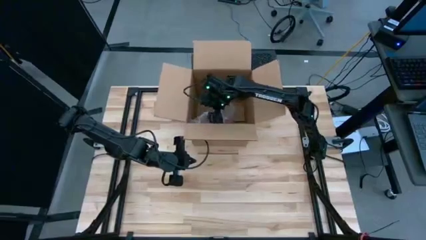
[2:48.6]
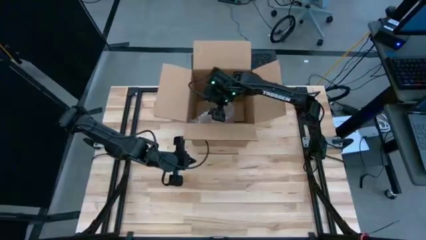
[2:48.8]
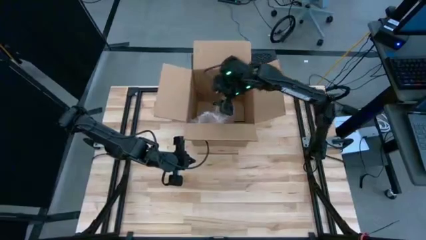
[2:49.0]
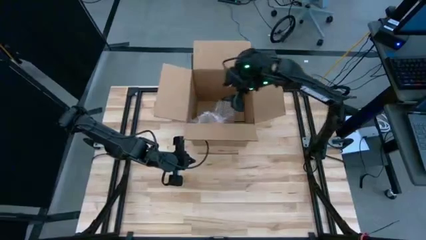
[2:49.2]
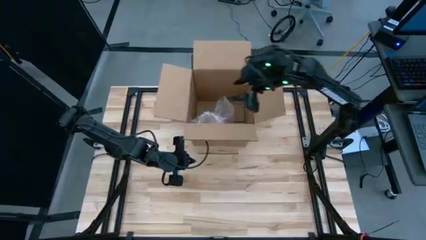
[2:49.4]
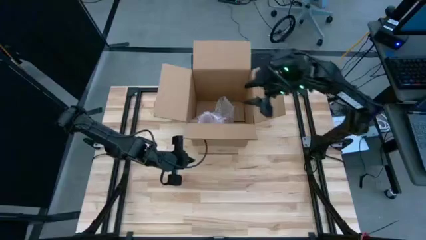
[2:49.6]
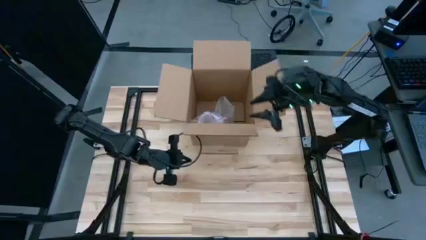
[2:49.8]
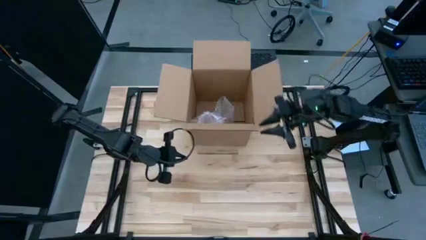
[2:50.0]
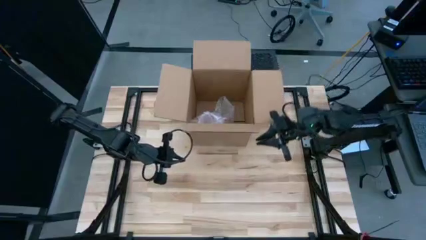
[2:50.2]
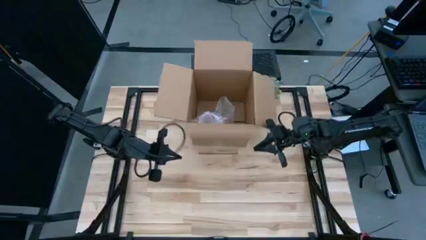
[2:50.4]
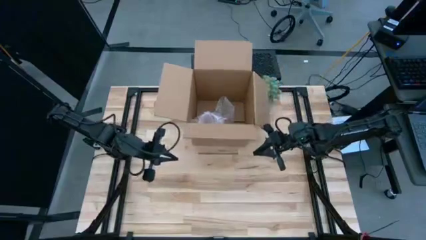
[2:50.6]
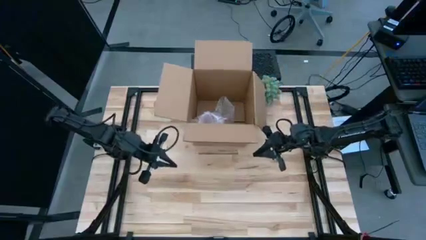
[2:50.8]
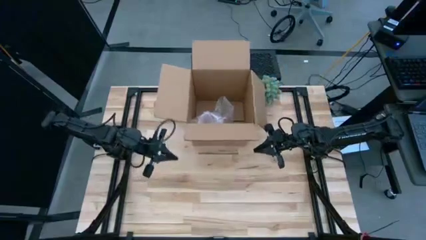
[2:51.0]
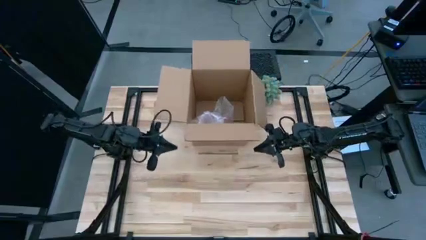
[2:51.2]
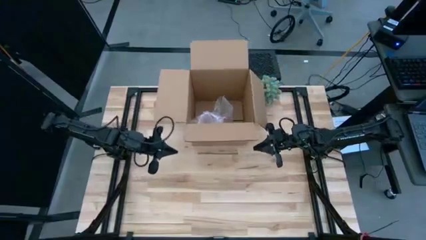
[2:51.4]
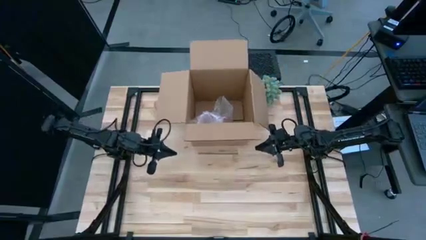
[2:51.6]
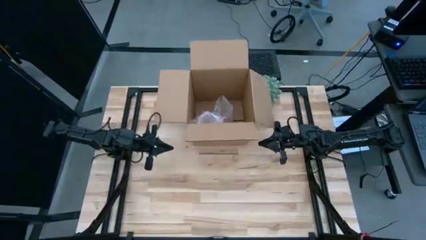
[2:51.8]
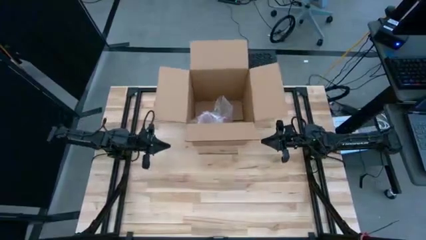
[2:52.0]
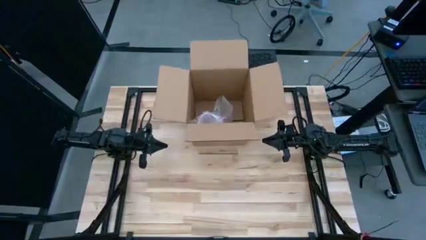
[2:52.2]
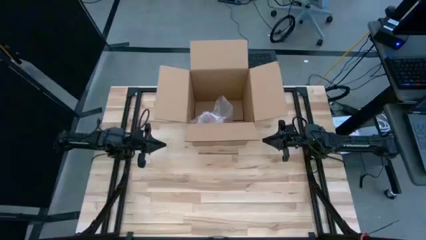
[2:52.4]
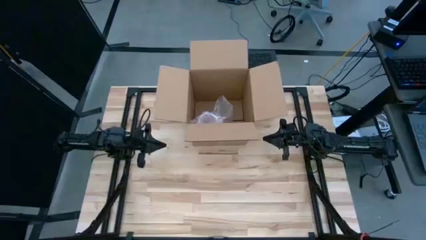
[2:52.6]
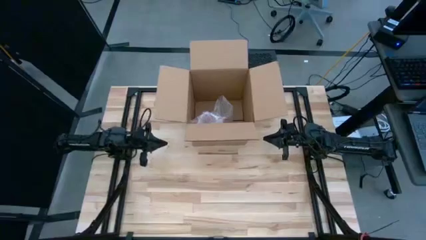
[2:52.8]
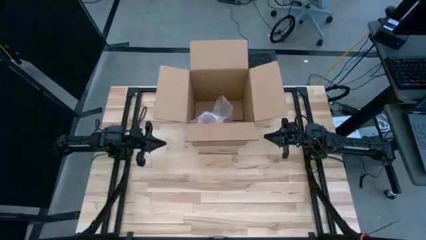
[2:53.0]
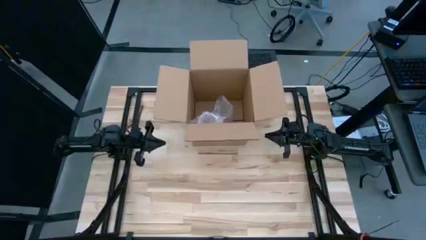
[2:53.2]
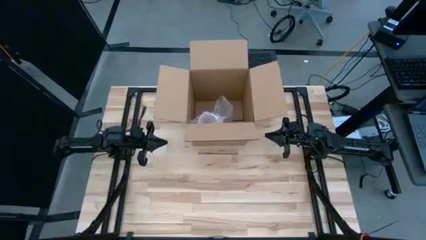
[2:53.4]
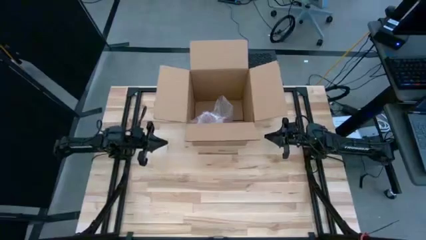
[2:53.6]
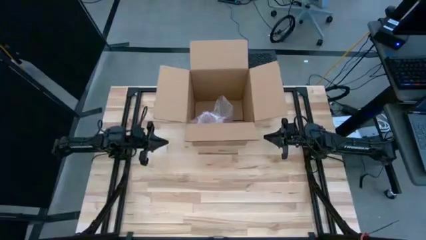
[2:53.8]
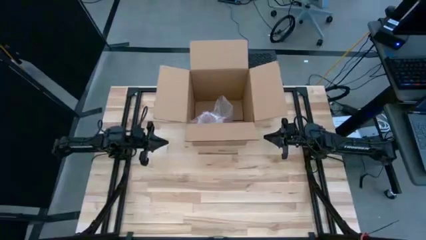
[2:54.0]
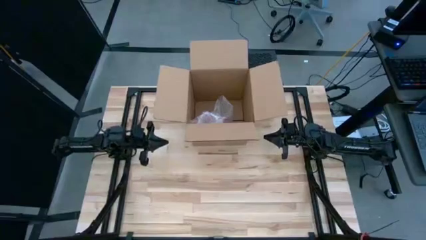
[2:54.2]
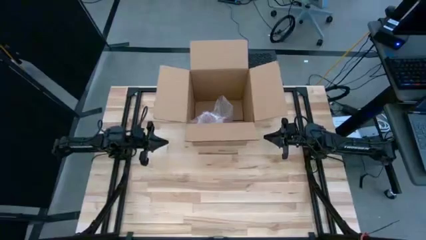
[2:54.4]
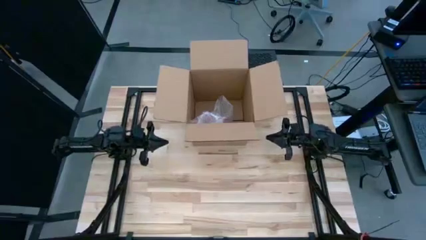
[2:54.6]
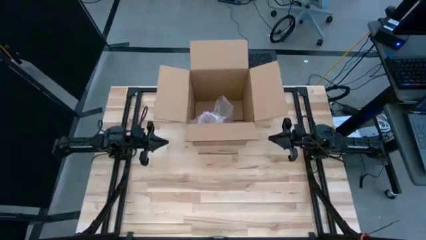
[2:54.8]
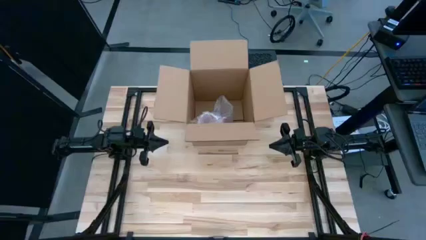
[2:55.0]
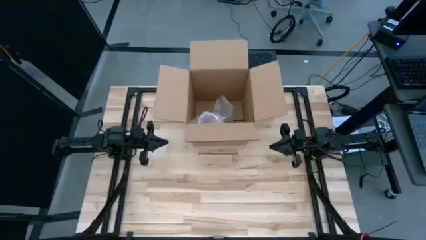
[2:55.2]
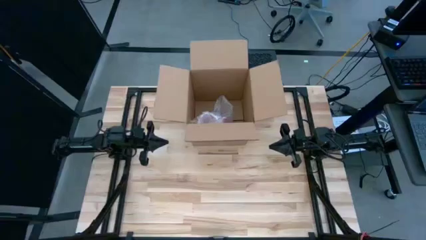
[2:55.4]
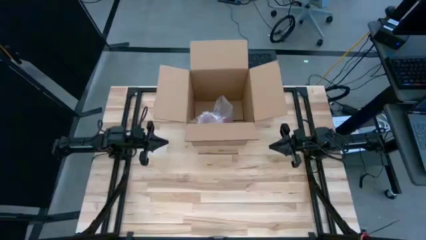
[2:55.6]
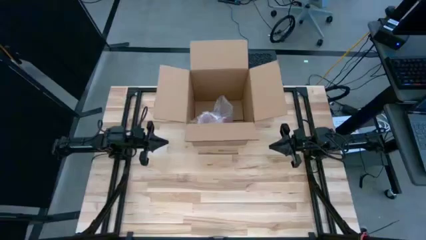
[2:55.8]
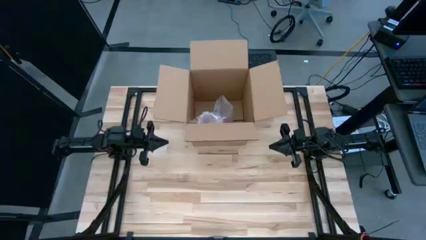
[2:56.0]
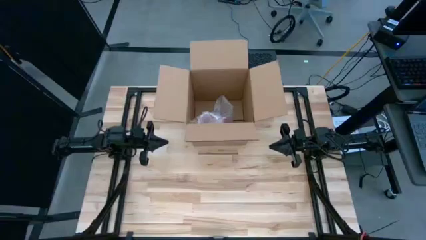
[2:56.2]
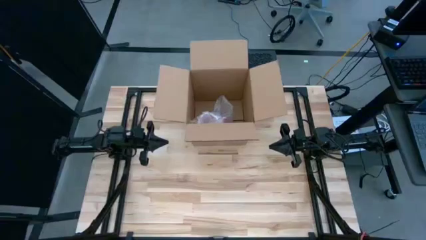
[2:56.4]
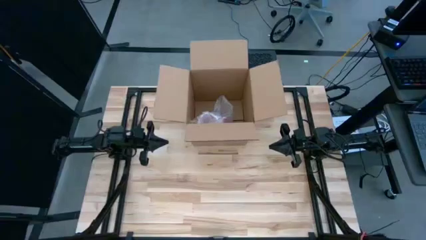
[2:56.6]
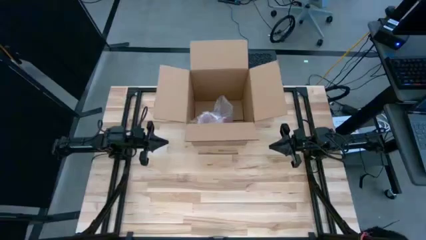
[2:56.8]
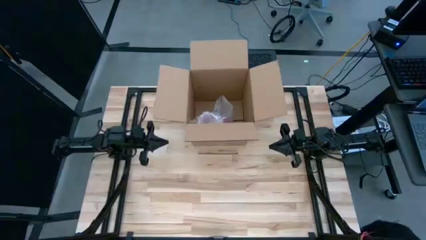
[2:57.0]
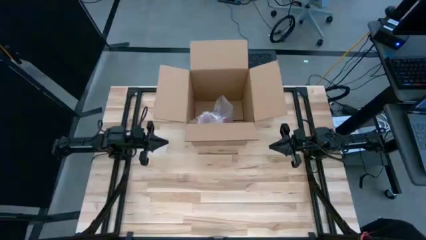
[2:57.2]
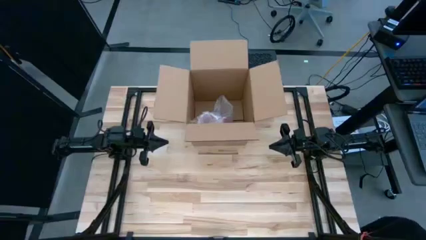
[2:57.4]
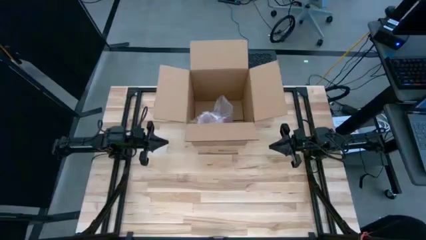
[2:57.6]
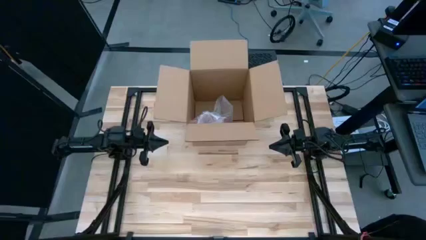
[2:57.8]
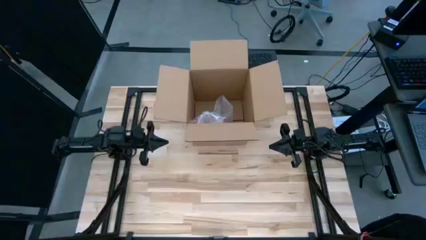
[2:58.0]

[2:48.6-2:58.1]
Task: wrap mug
Return to Home Position

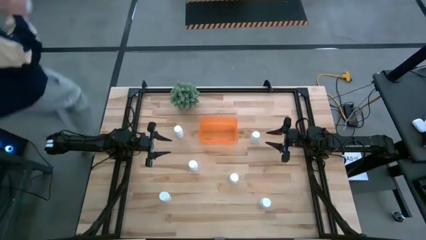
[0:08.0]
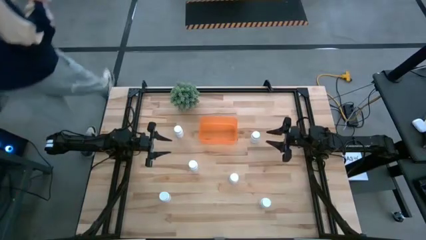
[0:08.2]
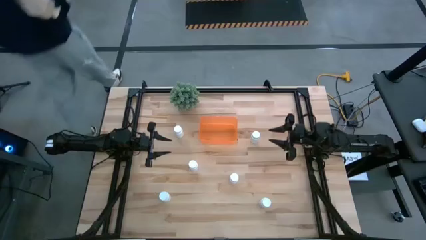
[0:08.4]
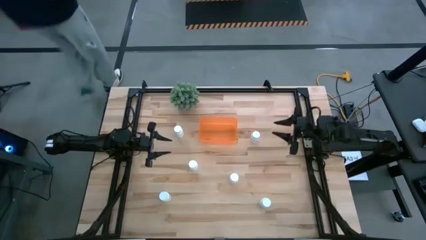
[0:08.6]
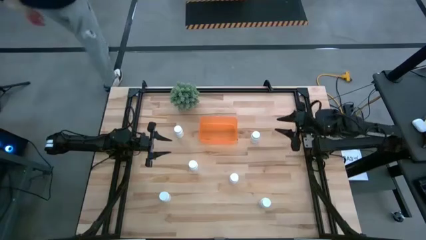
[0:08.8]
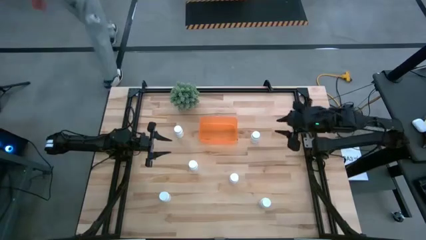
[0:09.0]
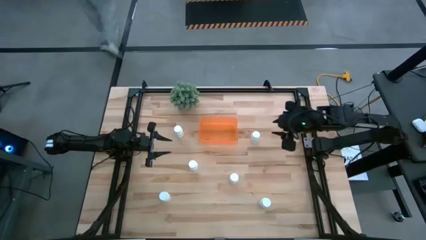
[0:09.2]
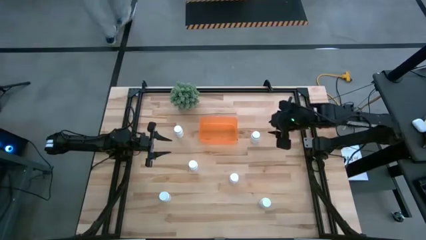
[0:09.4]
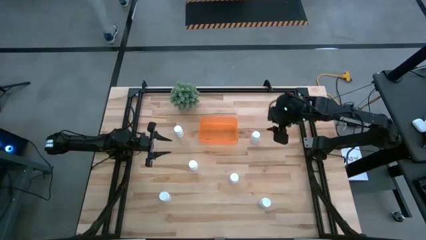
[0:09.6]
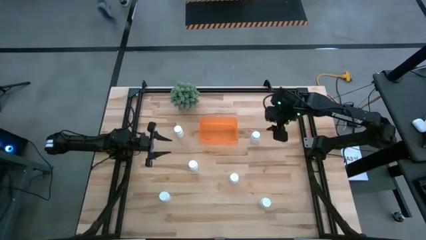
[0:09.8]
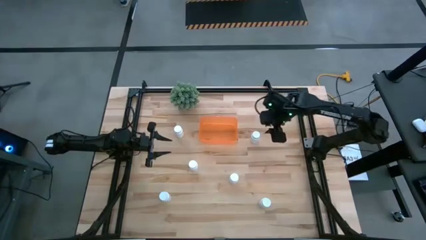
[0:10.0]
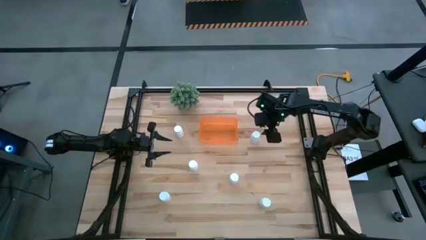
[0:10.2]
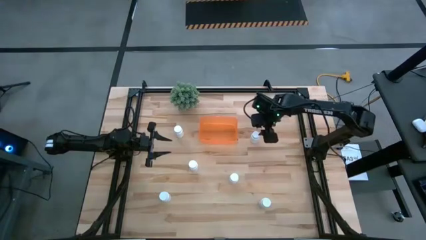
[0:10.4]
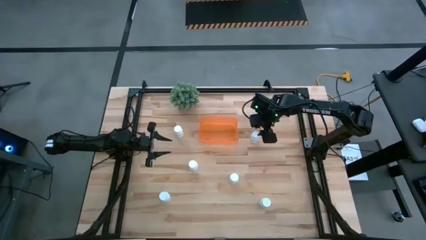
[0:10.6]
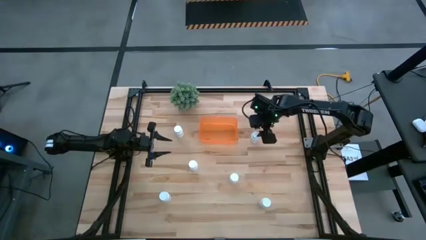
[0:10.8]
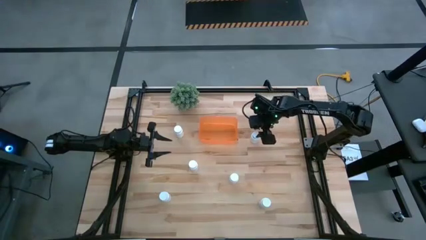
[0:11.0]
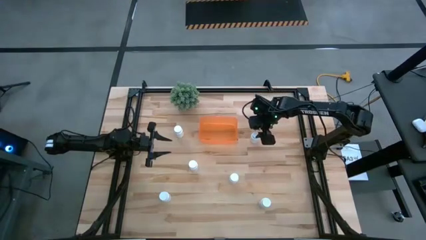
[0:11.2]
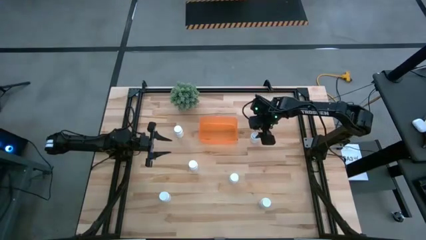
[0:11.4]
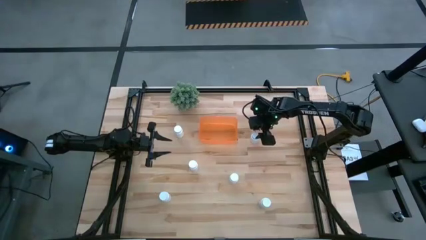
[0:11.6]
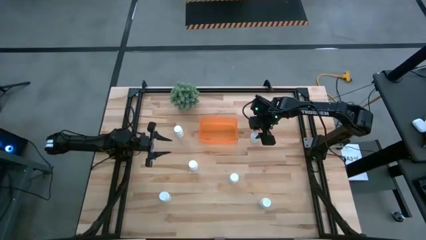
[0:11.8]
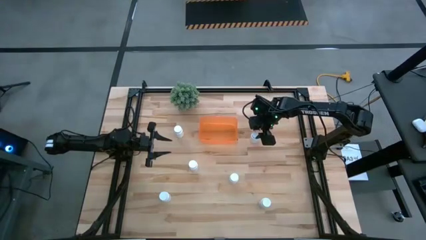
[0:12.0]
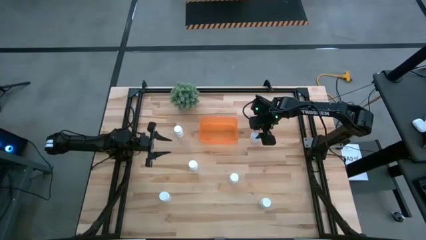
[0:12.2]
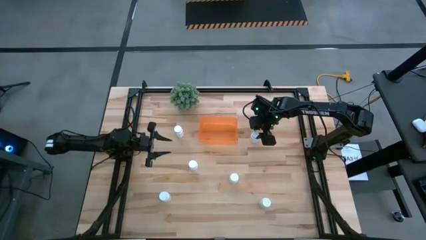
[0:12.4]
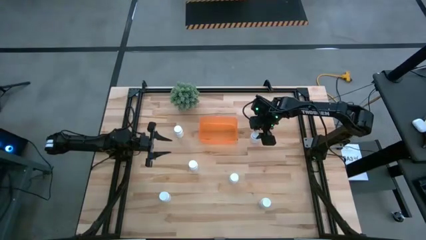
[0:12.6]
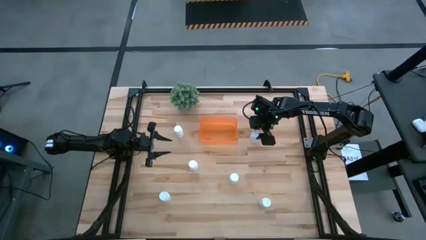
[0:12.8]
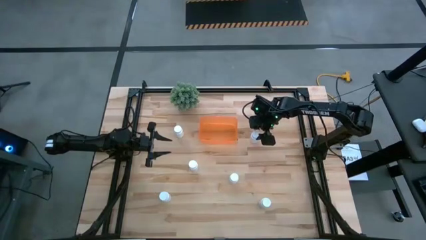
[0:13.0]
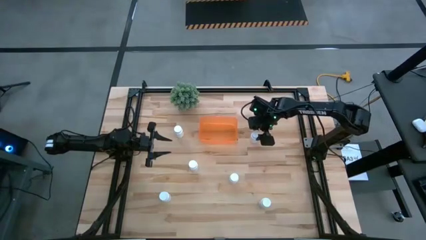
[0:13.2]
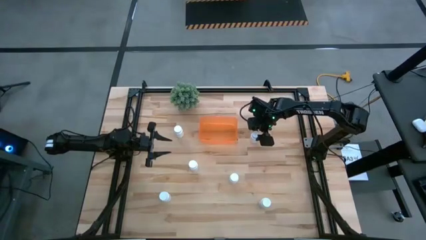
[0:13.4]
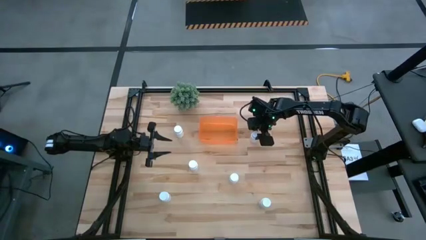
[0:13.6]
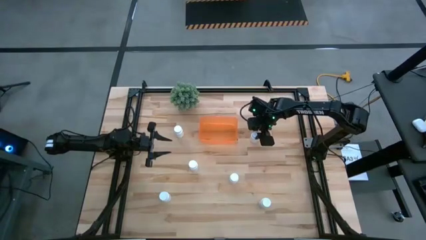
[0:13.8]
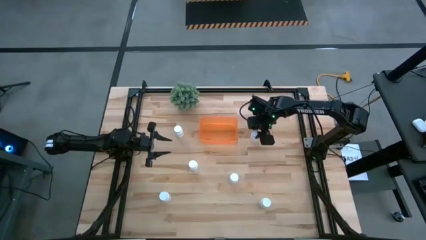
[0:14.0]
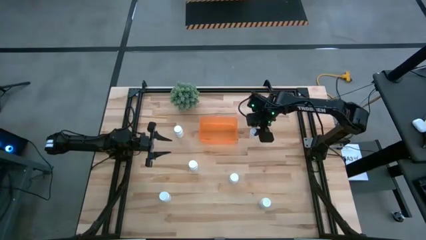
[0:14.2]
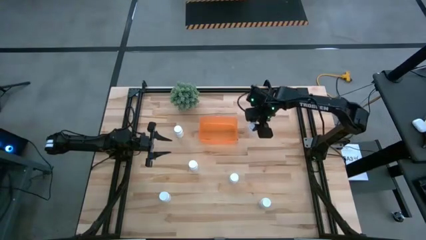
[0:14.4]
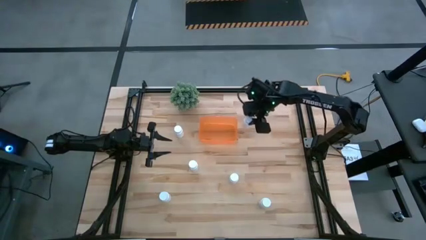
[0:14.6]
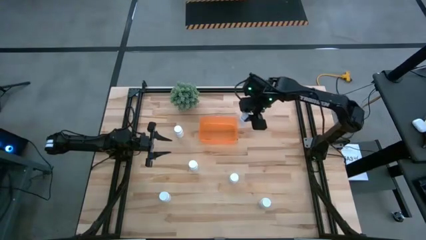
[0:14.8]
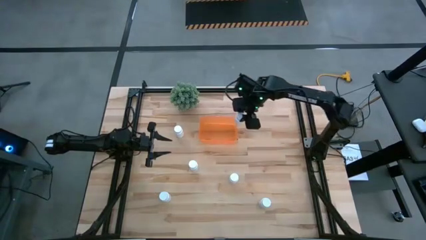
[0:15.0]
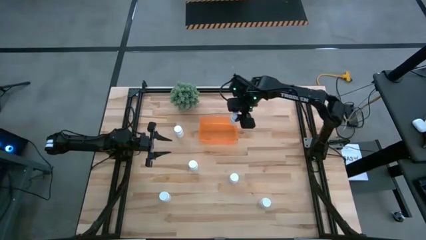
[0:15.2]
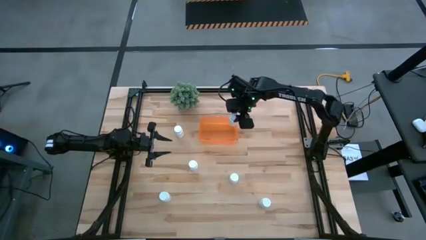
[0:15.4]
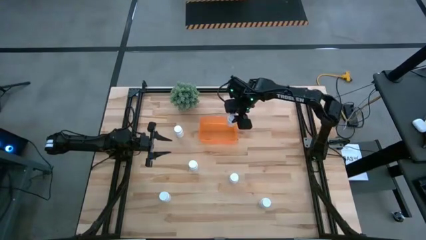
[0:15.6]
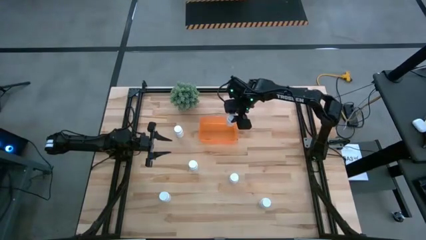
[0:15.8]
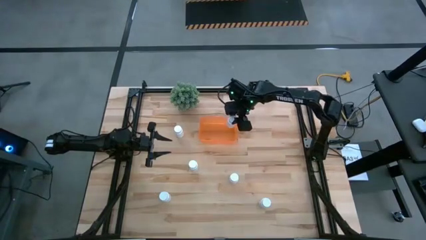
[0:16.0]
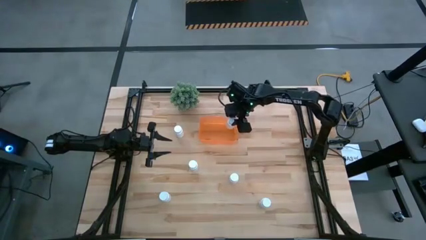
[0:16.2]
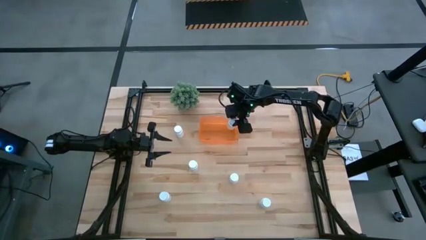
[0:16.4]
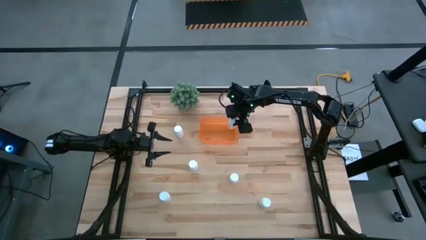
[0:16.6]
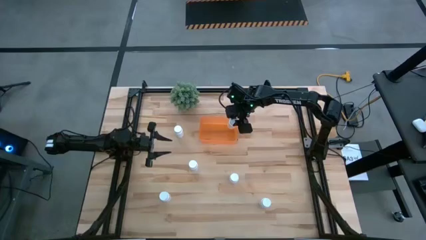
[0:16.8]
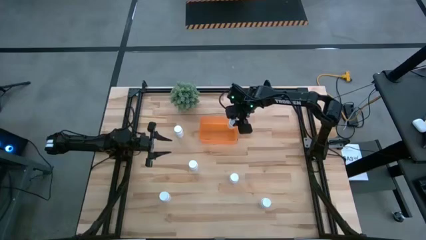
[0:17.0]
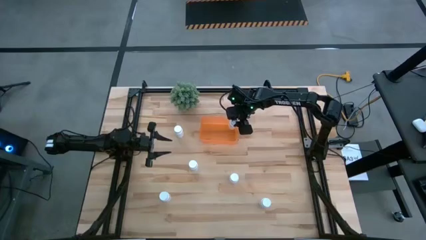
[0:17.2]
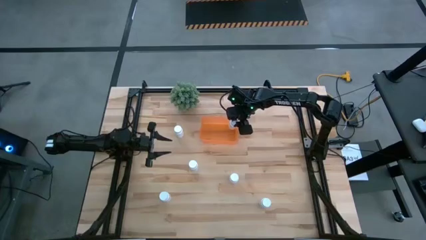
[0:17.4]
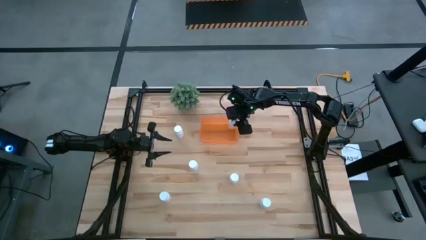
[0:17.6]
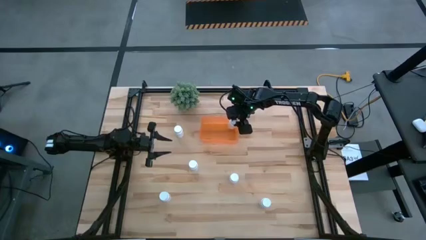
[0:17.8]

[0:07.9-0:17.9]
Task: Pick and place pill bottles into a basket
Put the white pill bottle into the orange bin
